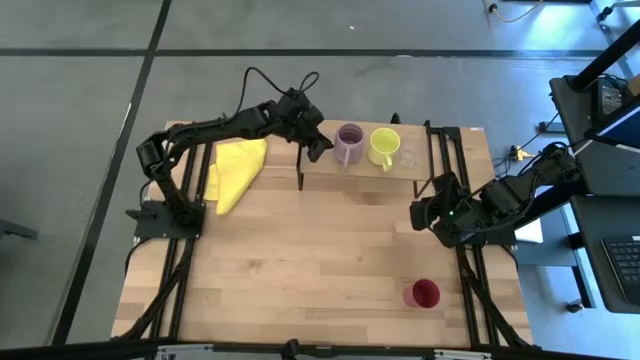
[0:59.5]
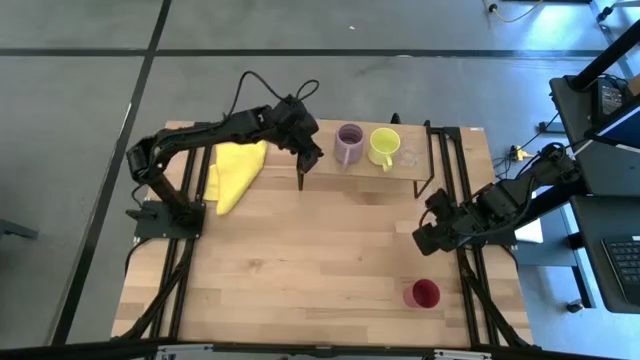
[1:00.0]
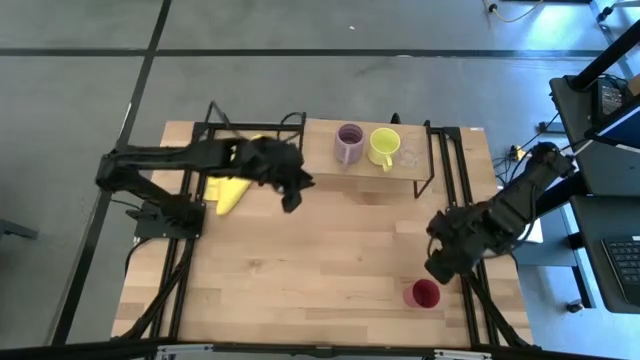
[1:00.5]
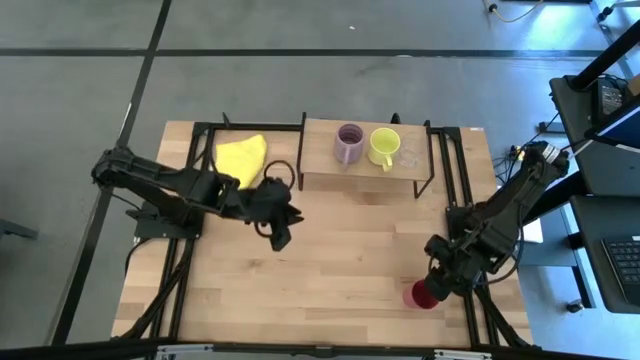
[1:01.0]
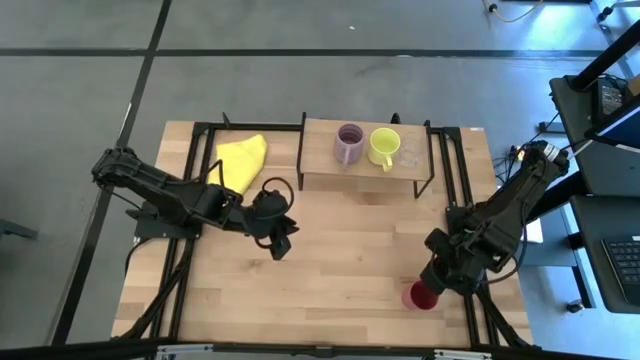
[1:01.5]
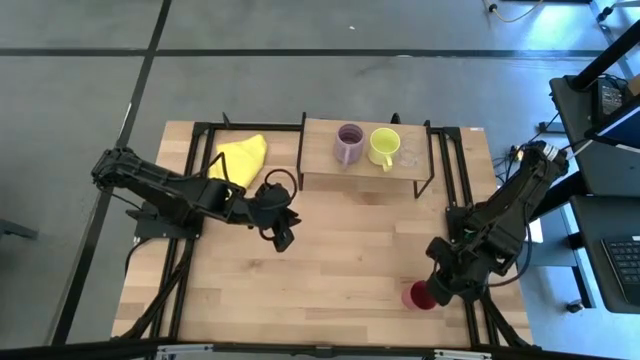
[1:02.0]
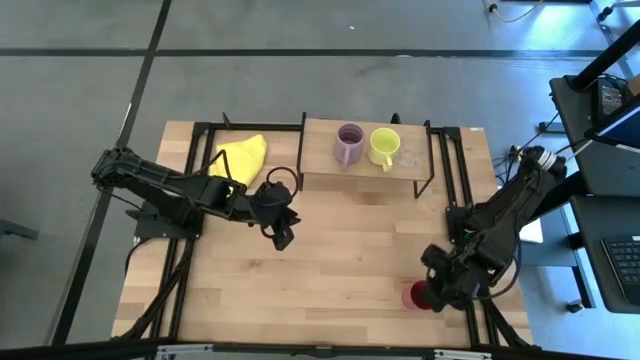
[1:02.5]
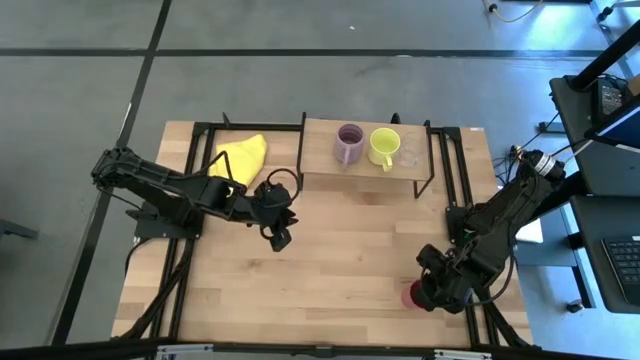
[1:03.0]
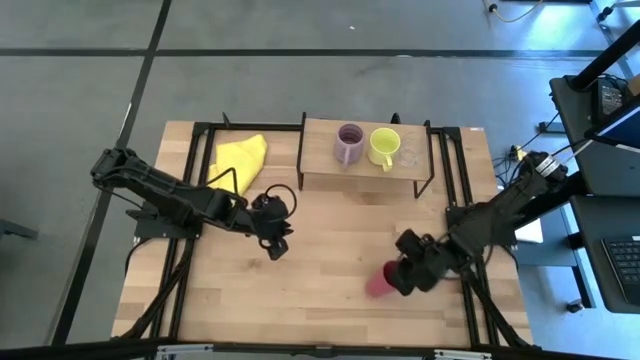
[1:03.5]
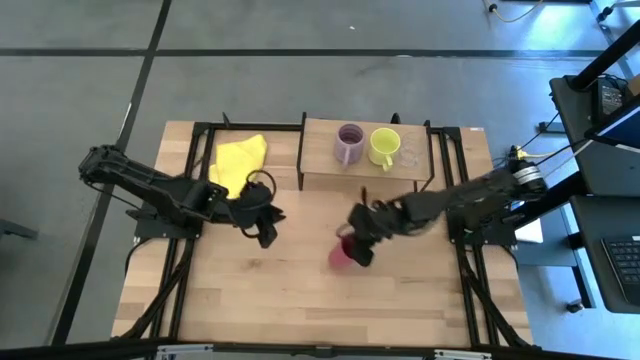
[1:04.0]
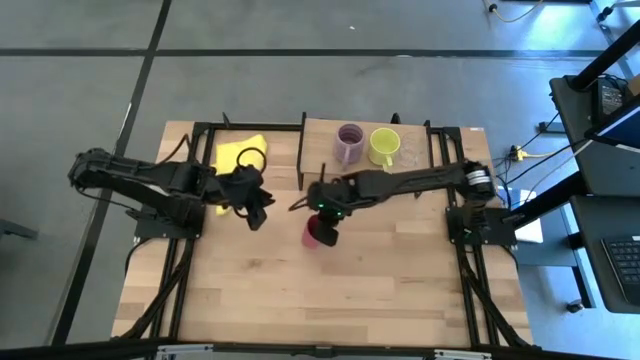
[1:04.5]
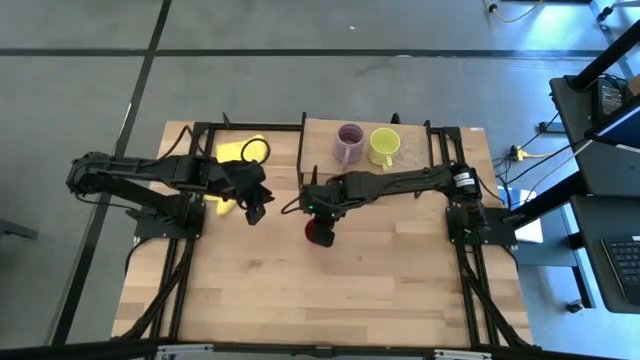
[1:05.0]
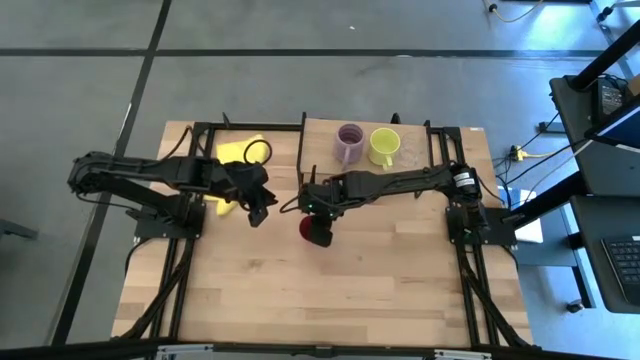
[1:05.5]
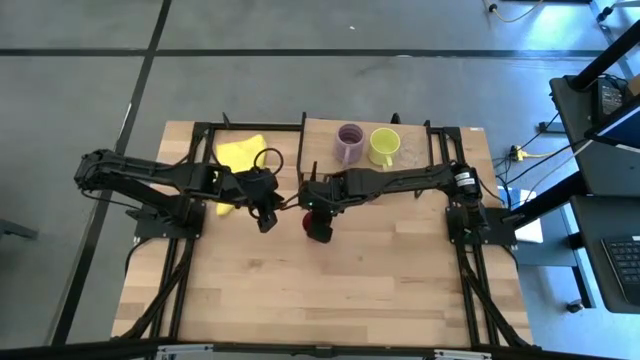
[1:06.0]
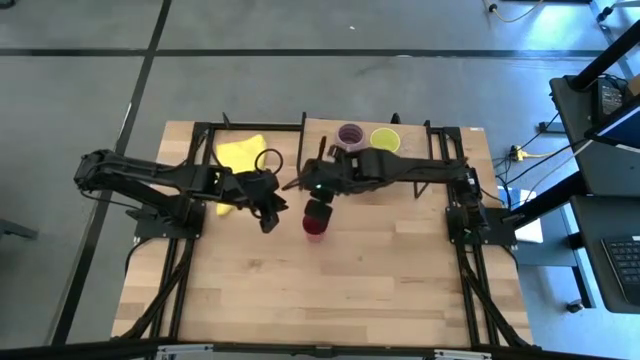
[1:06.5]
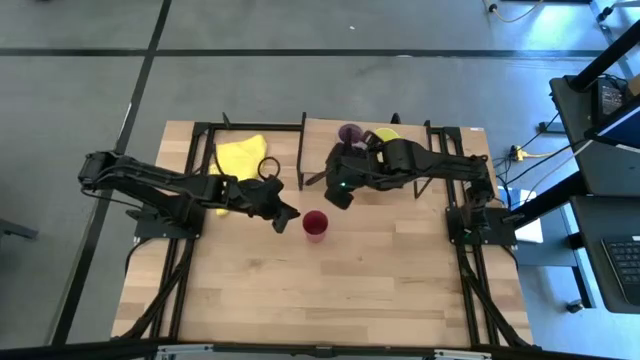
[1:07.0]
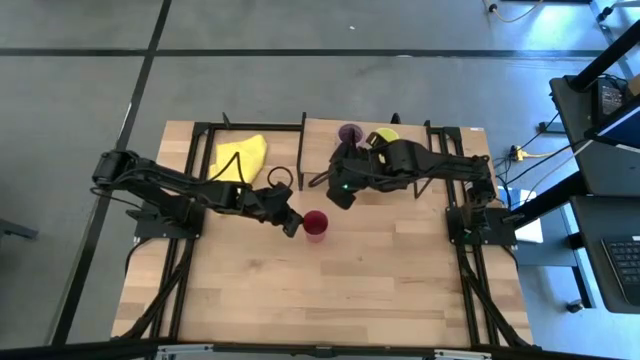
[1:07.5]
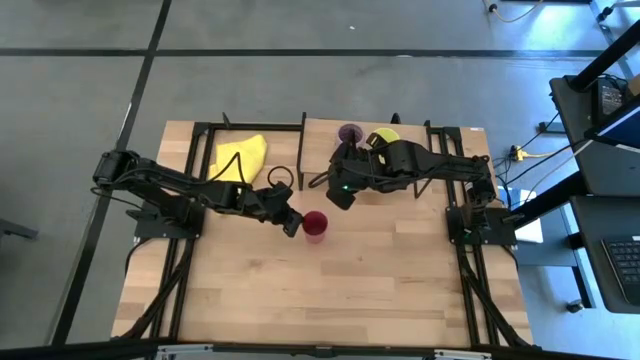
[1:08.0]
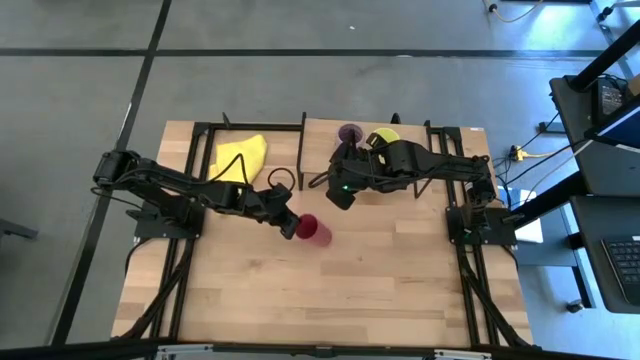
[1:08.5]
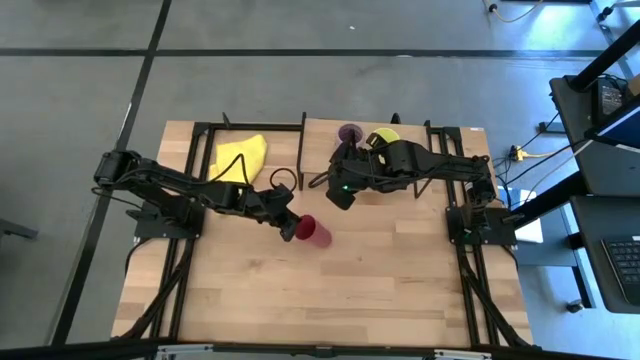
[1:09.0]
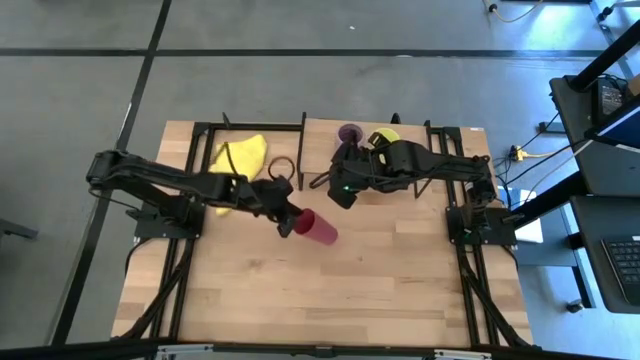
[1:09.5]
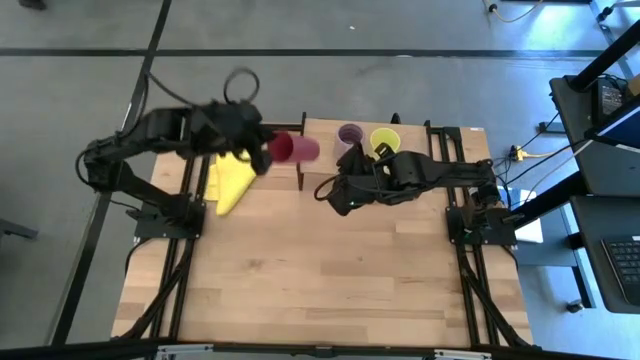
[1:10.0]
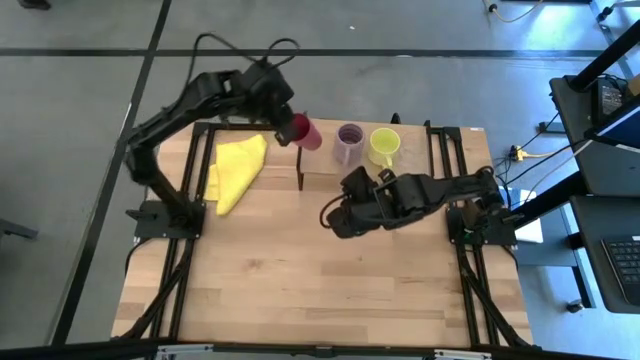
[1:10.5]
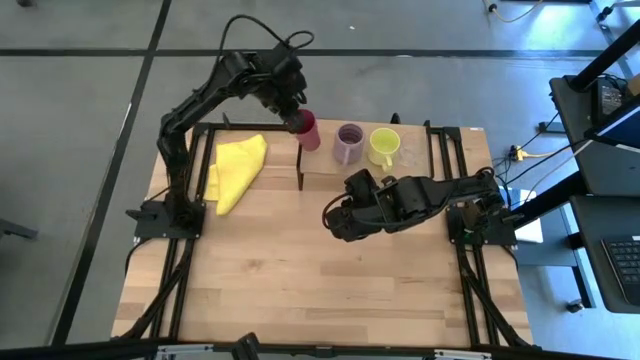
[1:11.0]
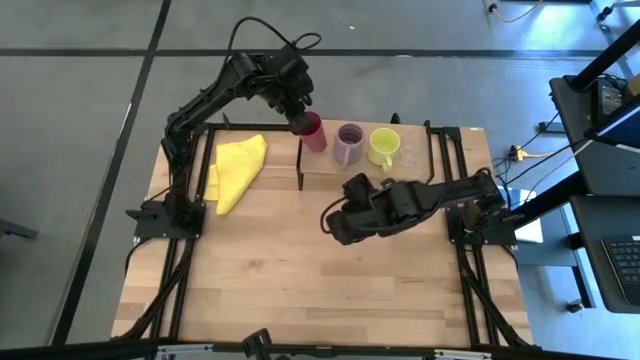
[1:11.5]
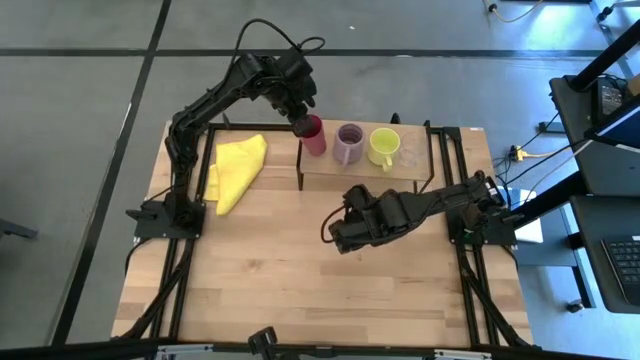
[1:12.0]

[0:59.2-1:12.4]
Task: Stack small to large cups/mugs on shelf
Put the pink cup on the shelf

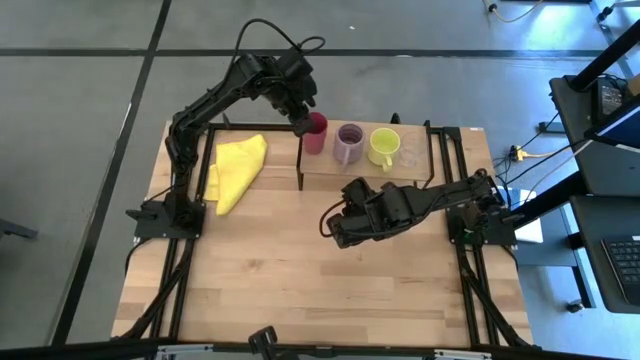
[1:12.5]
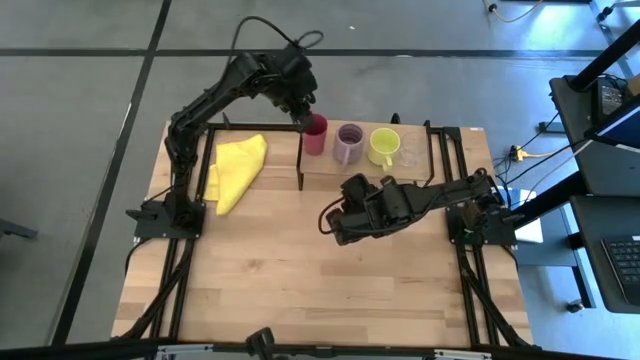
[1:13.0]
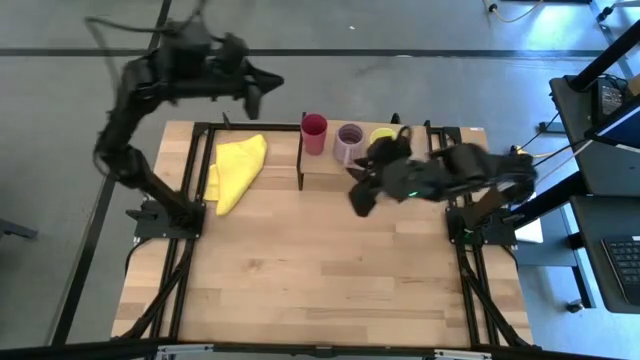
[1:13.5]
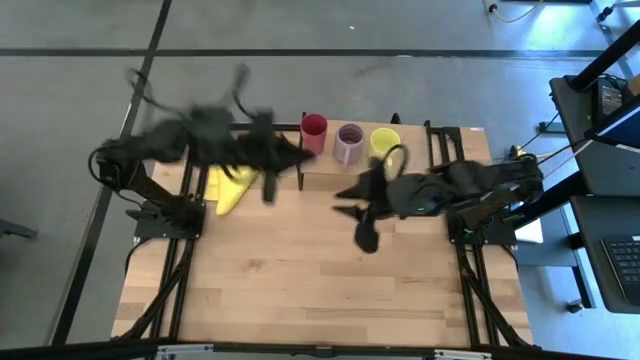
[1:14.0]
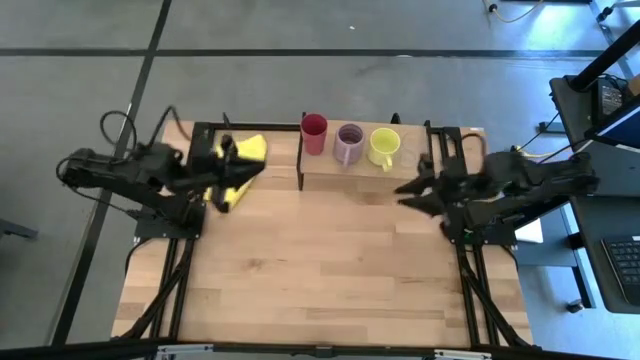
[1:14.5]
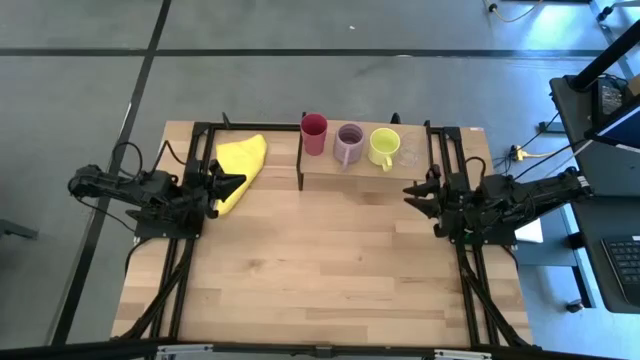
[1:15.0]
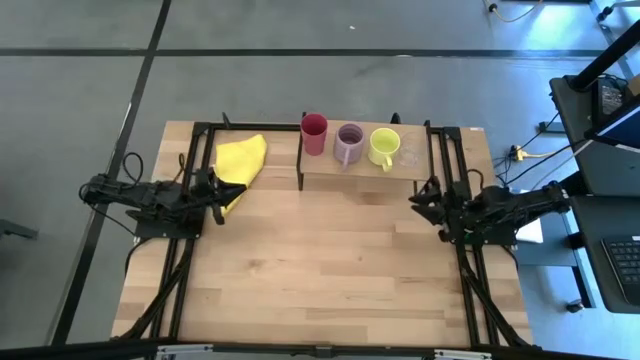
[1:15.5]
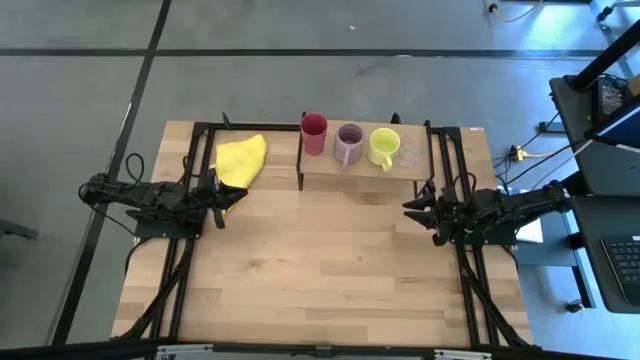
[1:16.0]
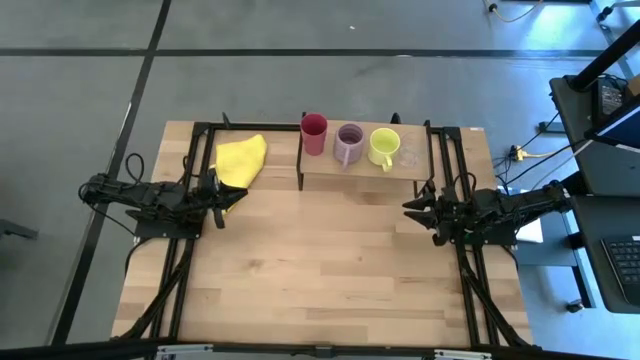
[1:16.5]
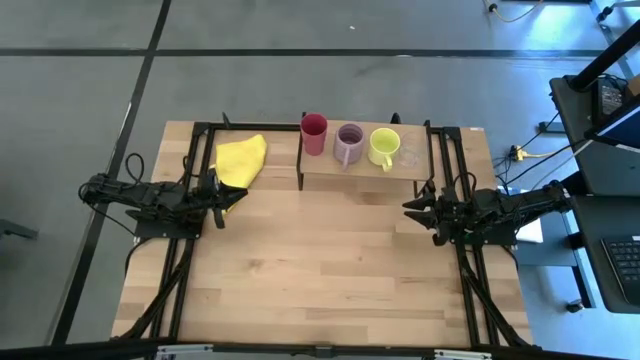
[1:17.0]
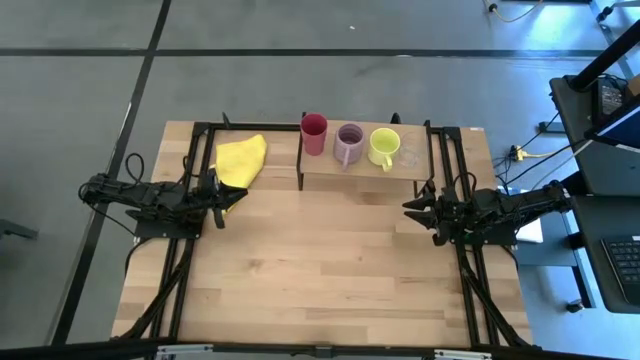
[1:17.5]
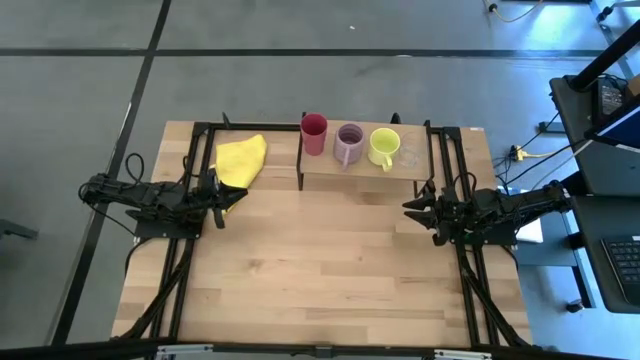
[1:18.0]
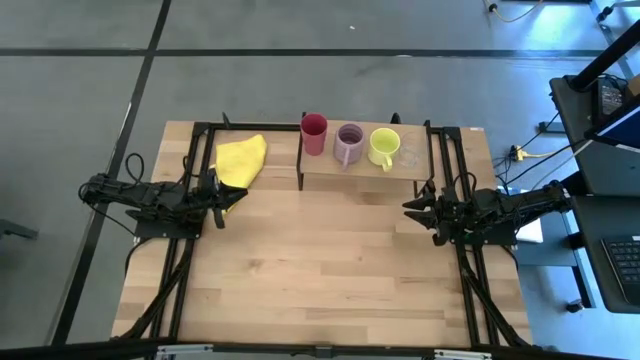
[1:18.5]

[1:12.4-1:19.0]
Return to Home Position

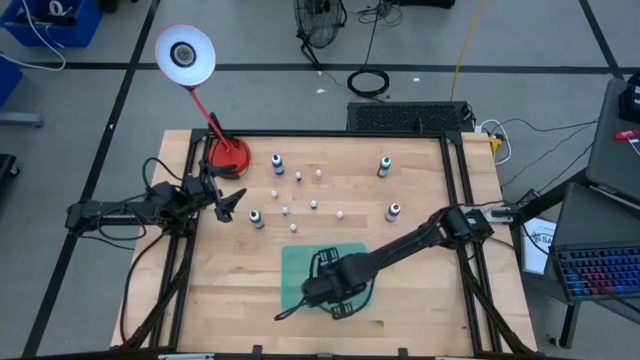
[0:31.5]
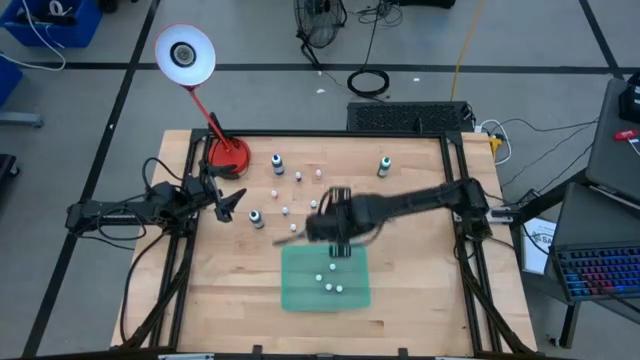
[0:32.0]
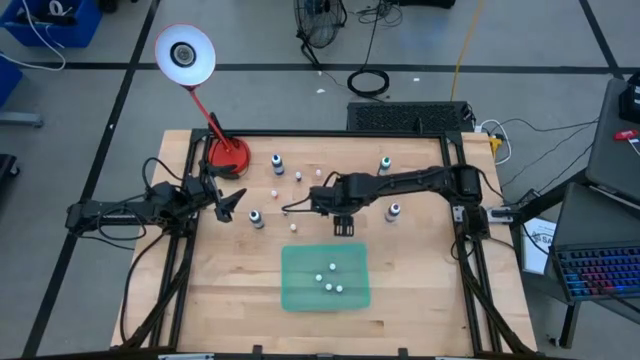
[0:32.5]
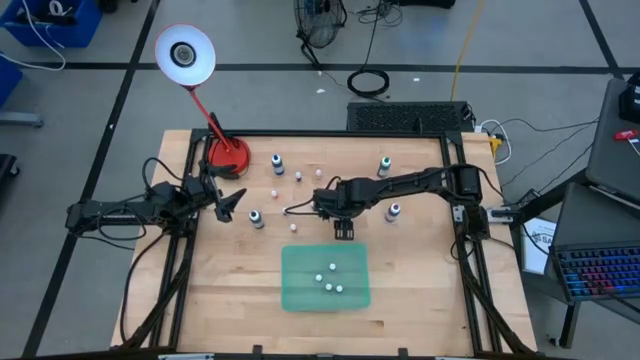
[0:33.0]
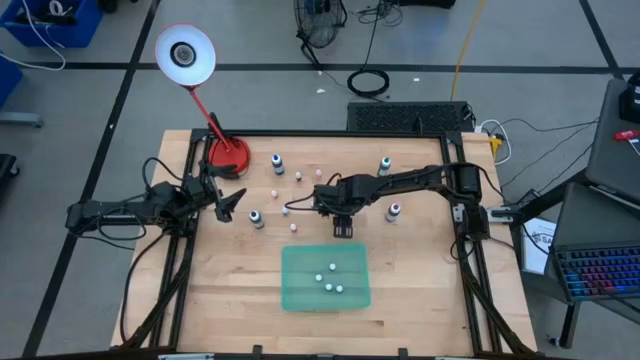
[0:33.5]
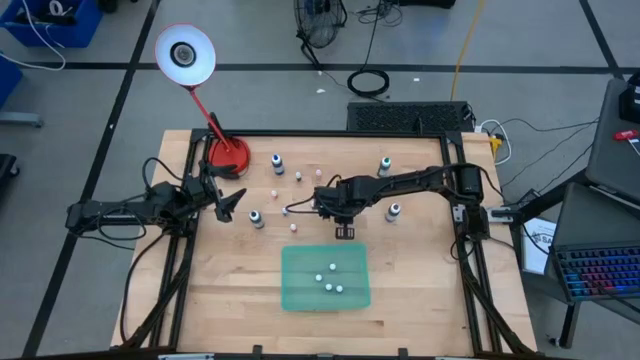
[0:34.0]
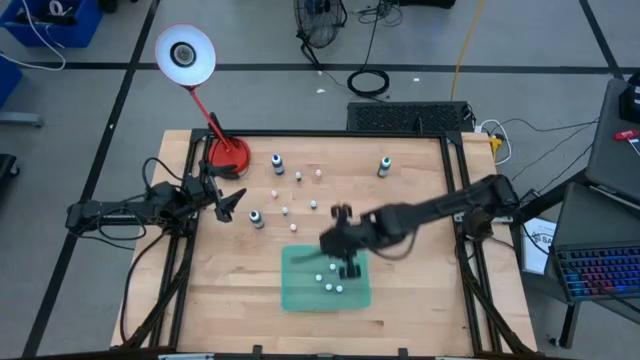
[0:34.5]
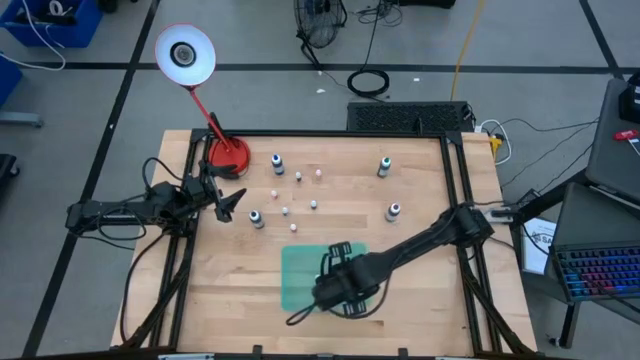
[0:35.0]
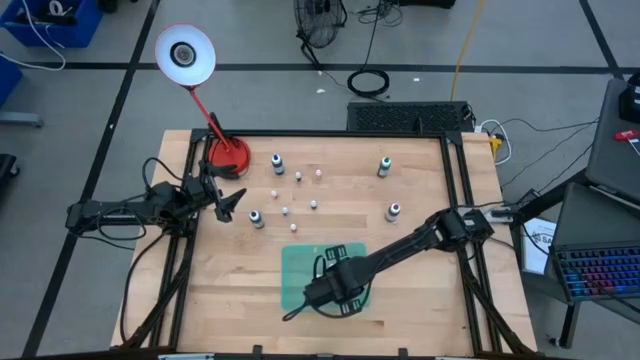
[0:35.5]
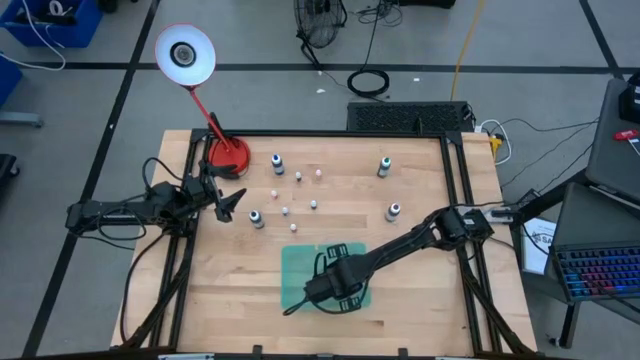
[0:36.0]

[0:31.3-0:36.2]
Task: Pick & Place food coloring
Put the small yellow food coloring bottle into the blue bin
